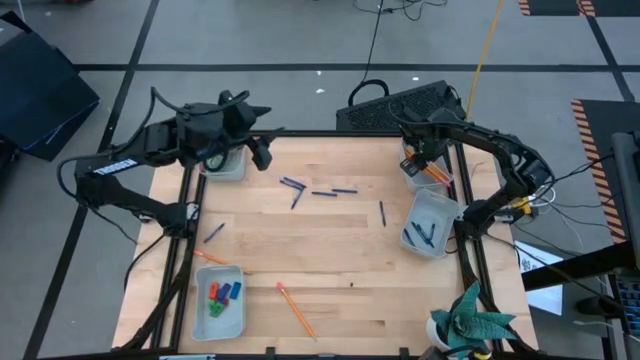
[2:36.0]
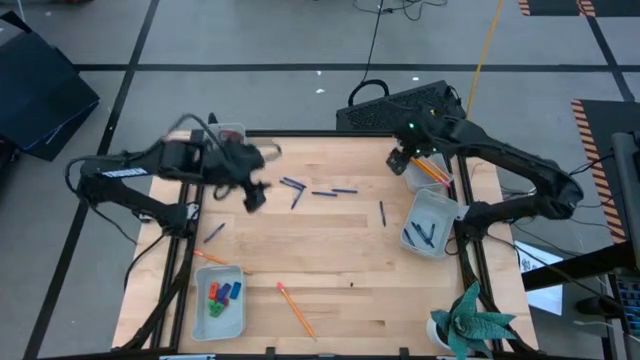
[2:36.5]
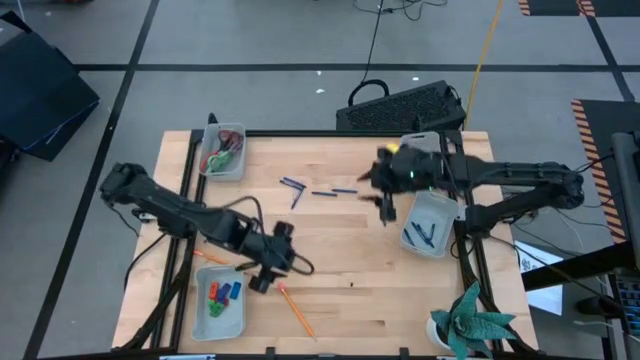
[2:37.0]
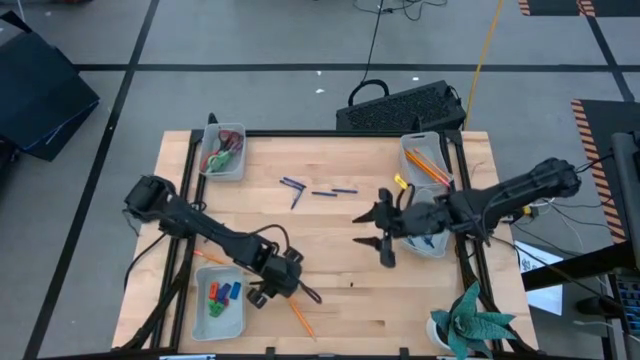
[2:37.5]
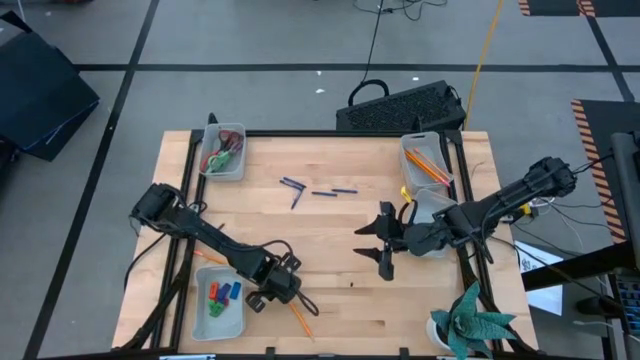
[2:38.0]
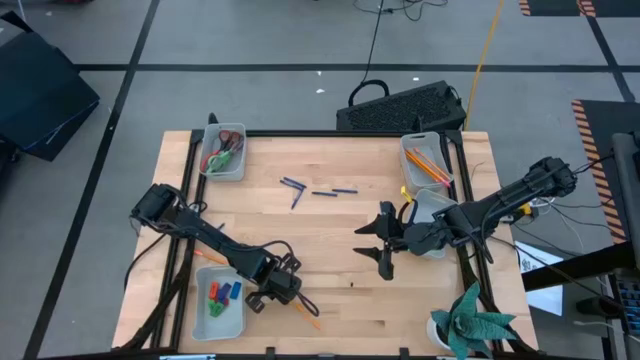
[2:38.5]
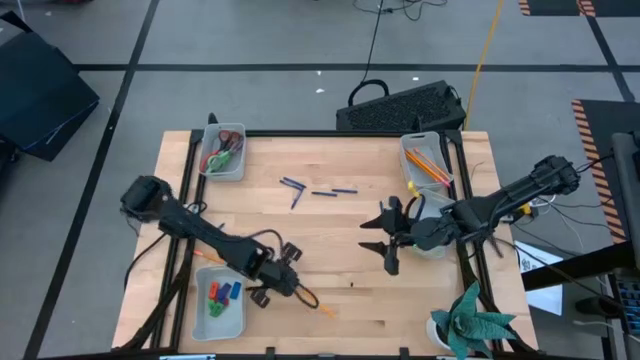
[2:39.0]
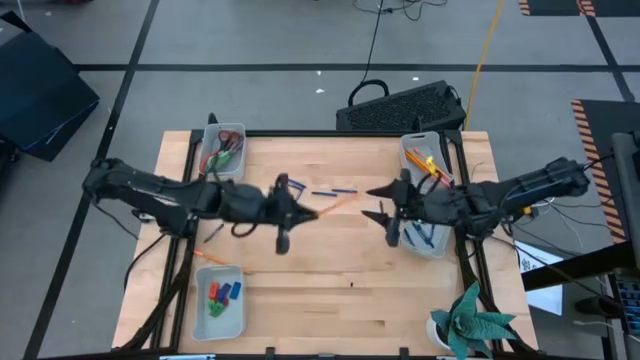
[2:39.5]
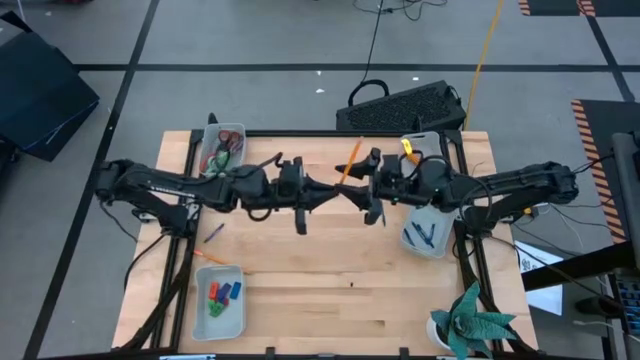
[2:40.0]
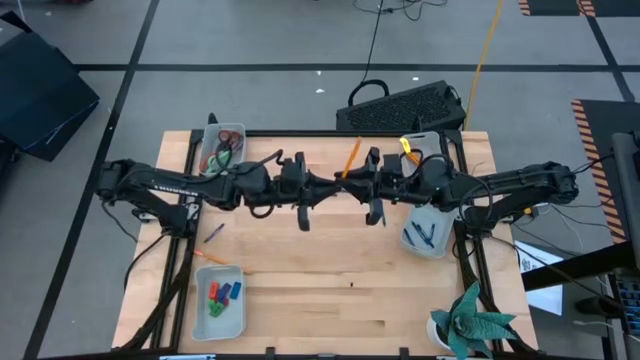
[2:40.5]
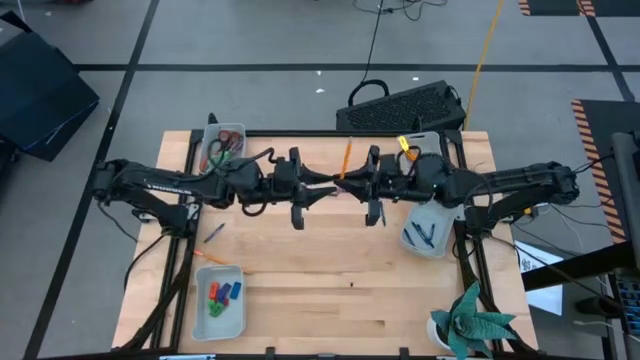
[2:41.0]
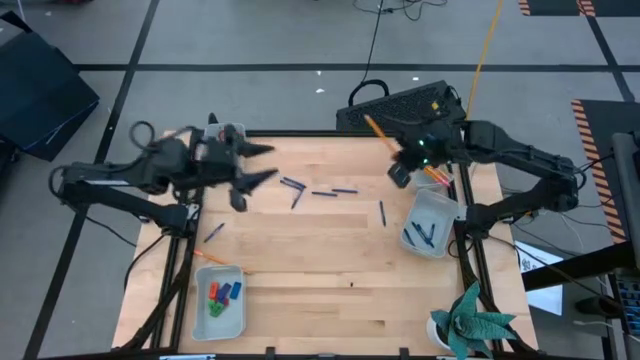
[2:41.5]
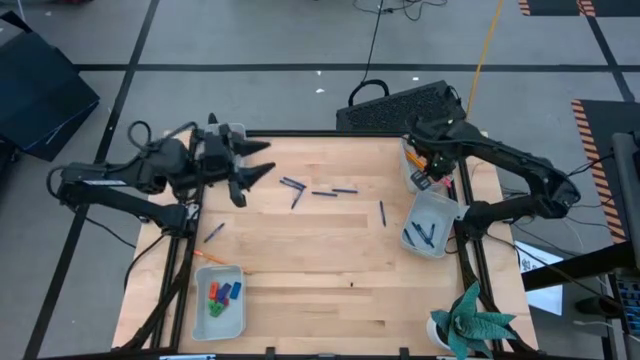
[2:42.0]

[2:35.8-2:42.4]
Task: Sort crayons/erasers/pens/pencils in bins
Put the orange pencil into the top right gray bin

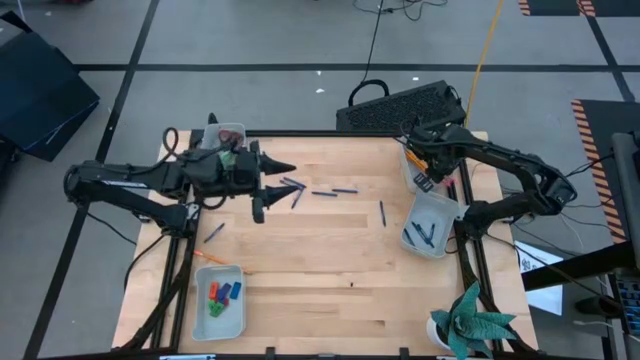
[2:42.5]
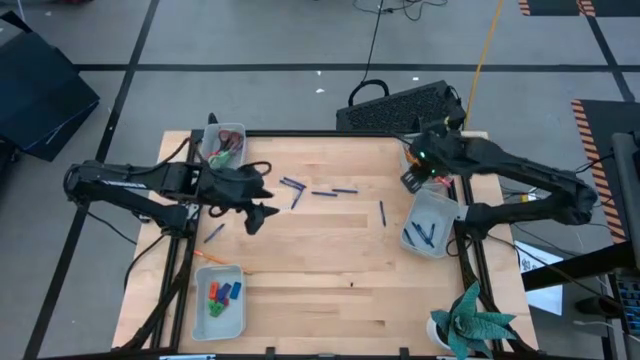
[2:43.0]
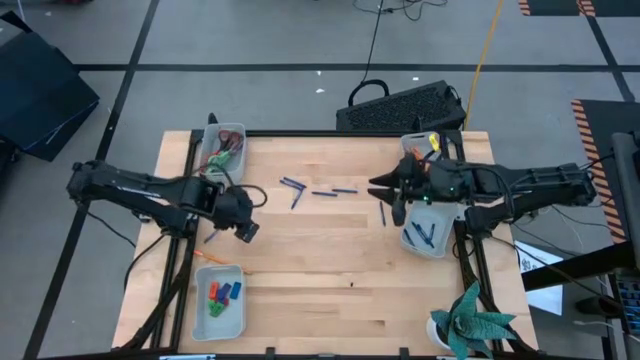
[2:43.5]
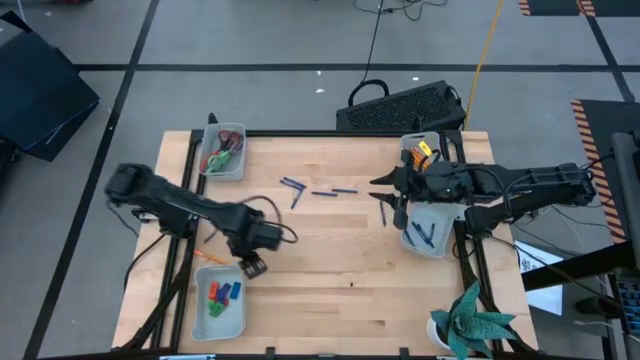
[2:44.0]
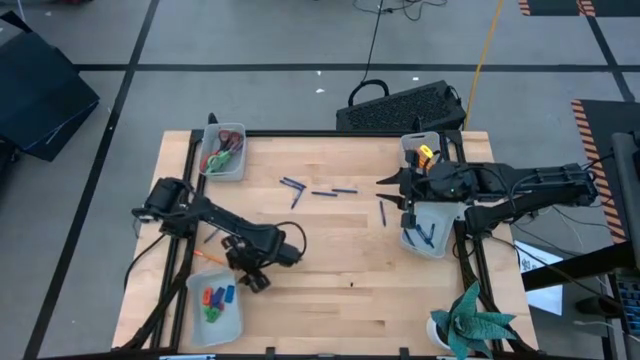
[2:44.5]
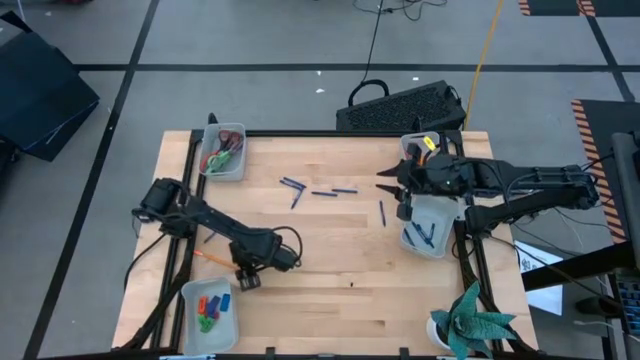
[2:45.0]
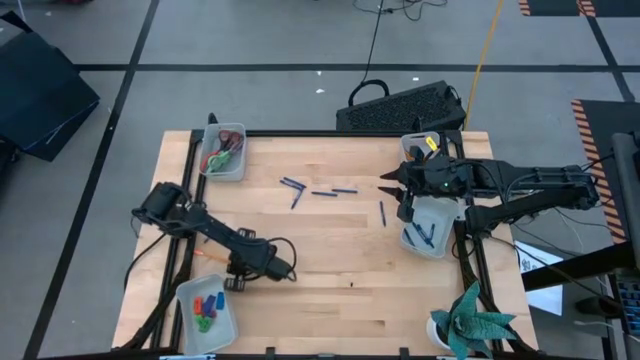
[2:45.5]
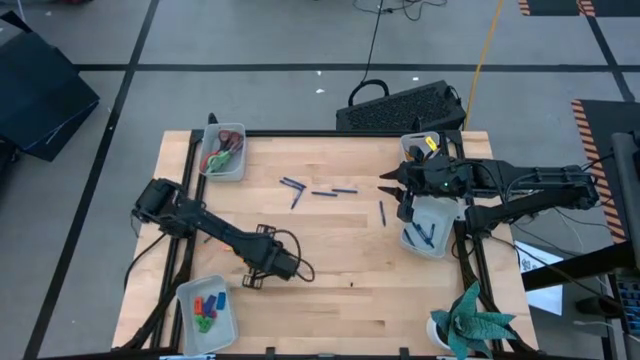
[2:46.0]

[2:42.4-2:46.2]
Put the orange pencil into the top right gray bin

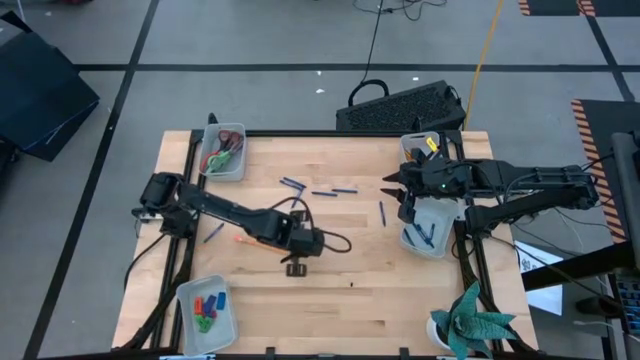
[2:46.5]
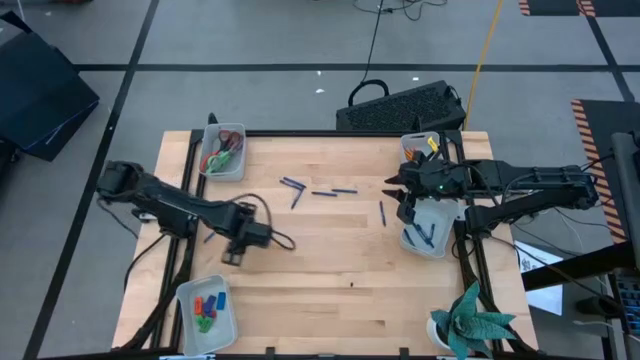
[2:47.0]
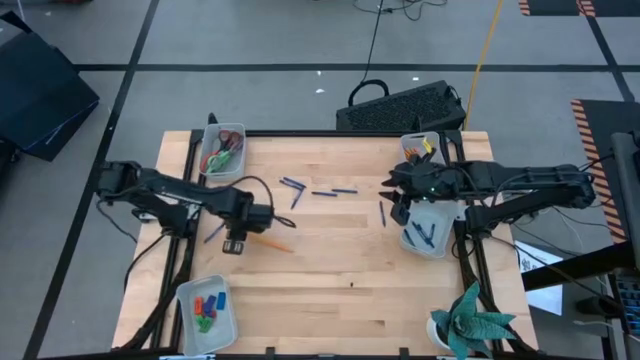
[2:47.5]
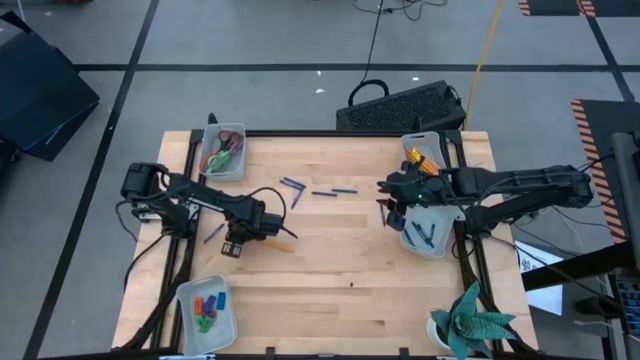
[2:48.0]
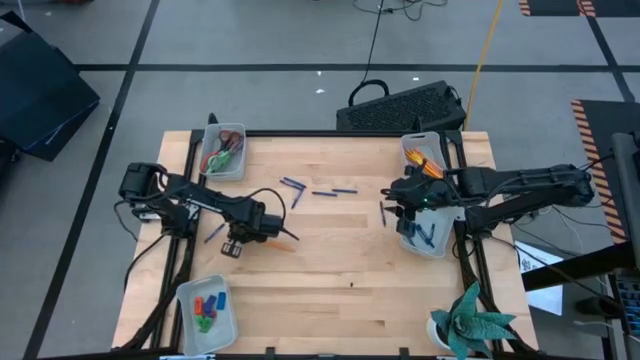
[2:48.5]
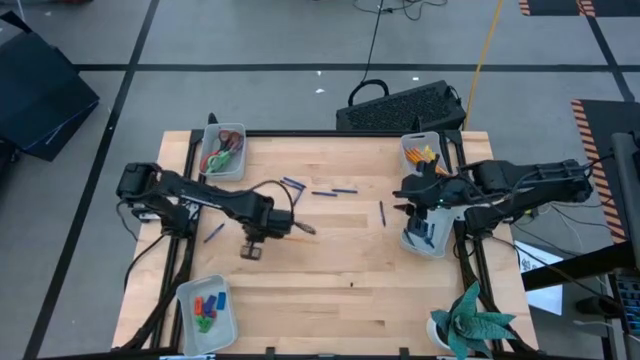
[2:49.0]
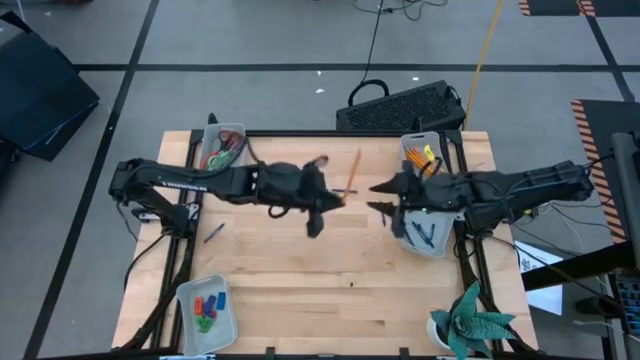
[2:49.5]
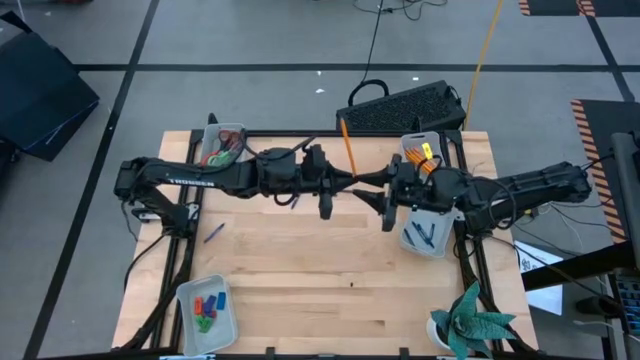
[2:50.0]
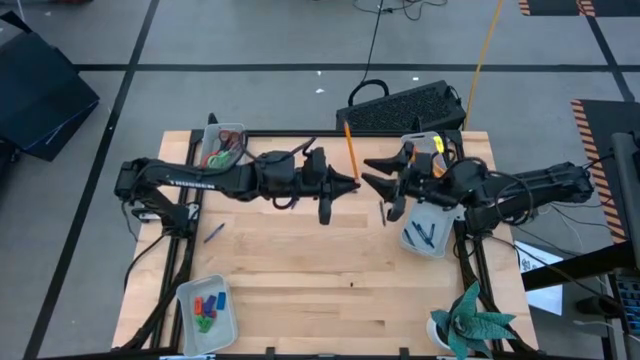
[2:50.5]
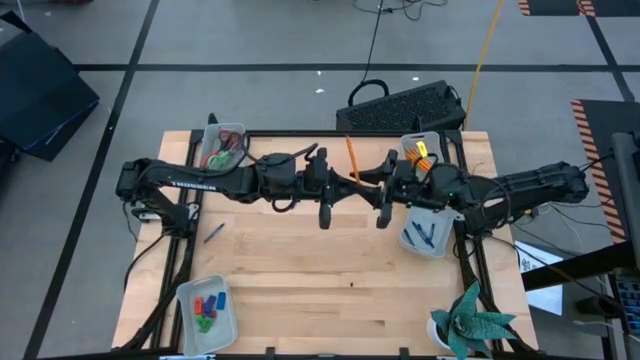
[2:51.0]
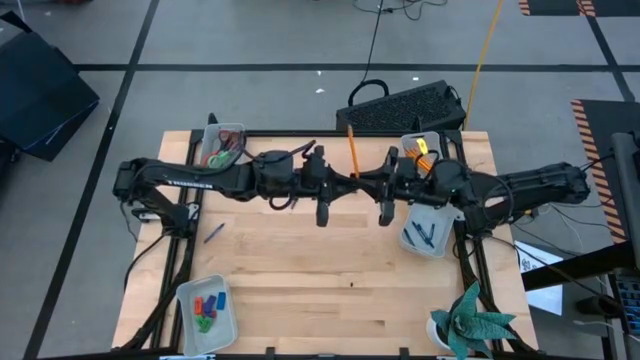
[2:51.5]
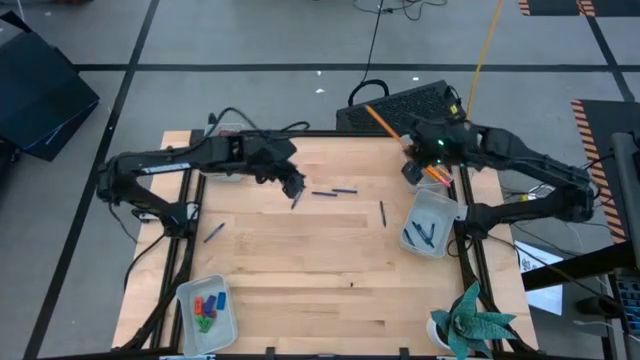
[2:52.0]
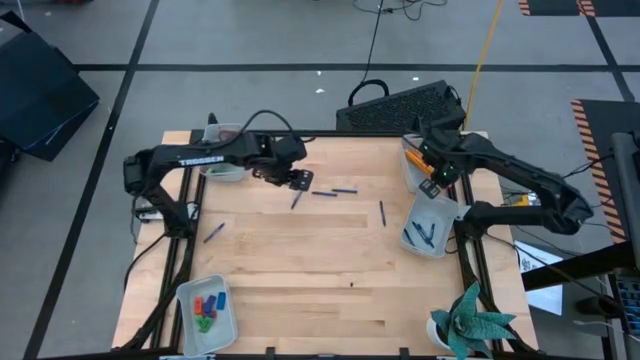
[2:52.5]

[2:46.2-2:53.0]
Put the orange pencil into the top right gray bin

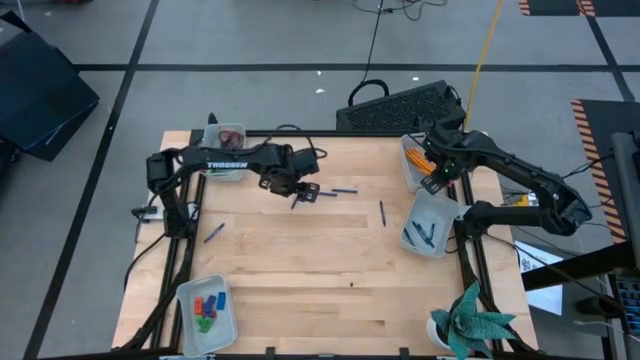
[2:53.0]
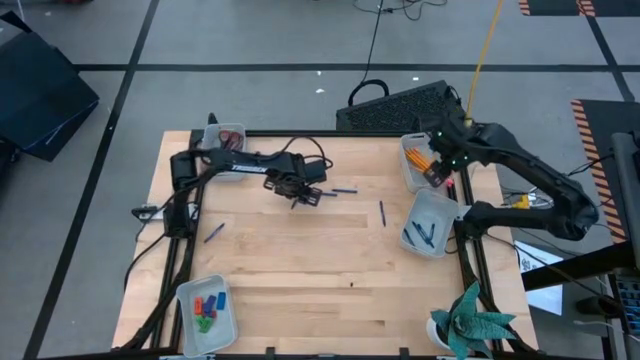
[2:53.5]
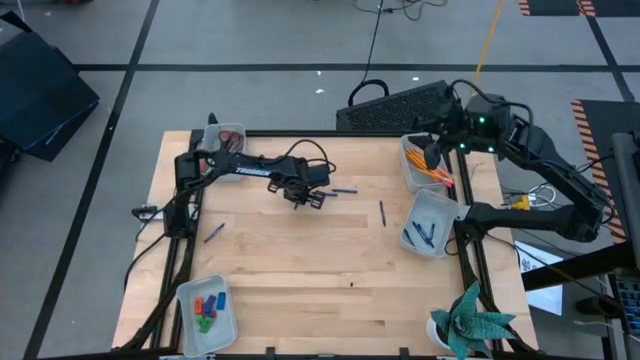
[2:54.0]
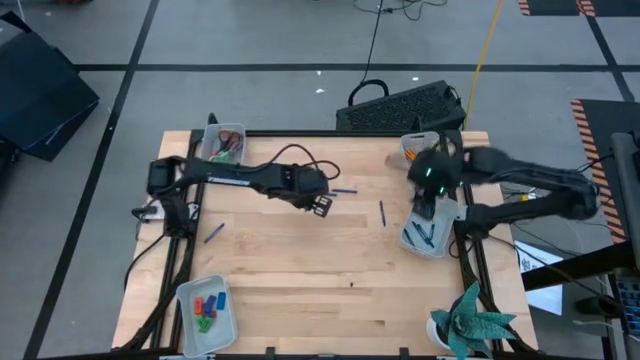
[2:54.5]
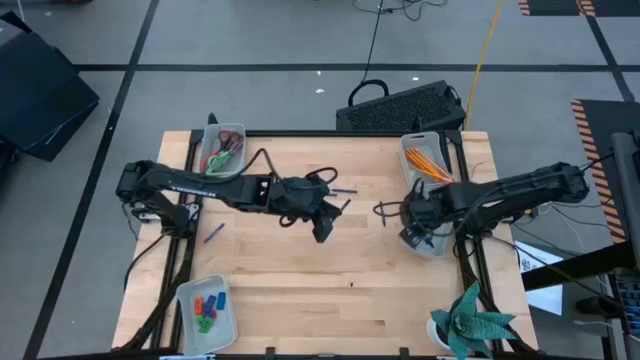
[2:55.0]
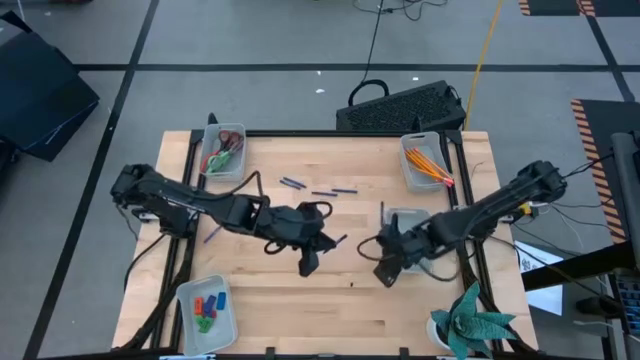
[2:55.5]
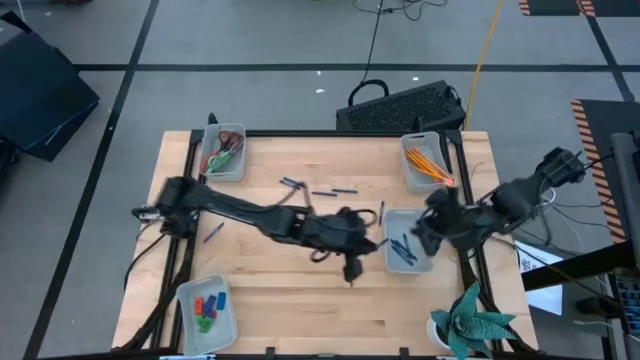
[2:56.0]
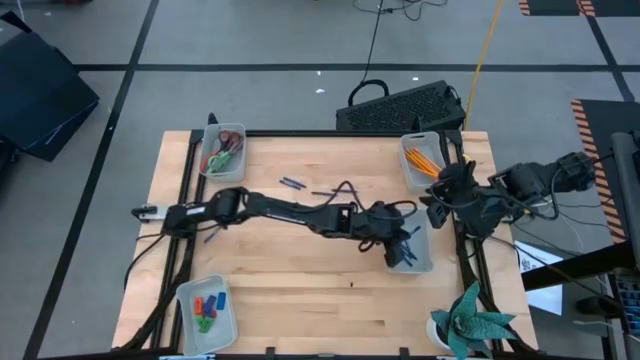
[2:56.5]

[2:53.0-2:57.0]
Put the blue crayon into the middle right gray bin
